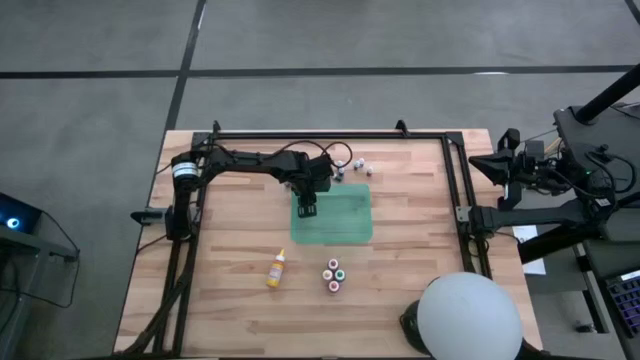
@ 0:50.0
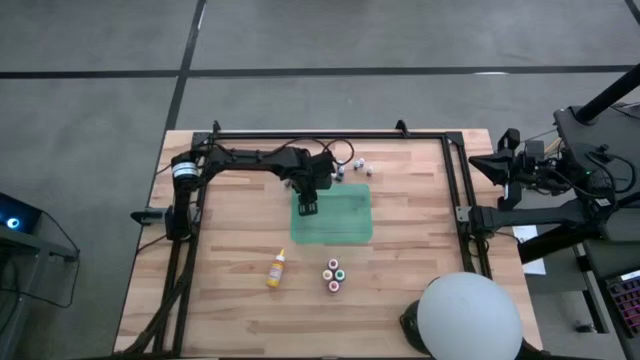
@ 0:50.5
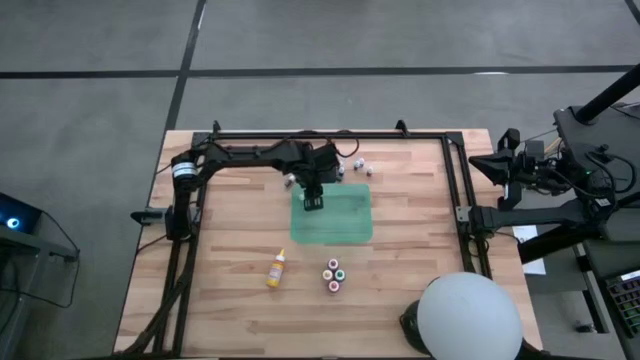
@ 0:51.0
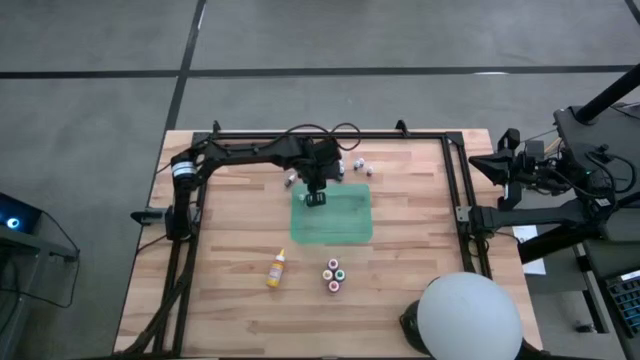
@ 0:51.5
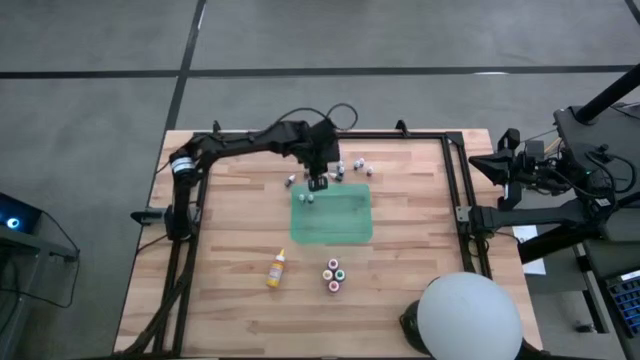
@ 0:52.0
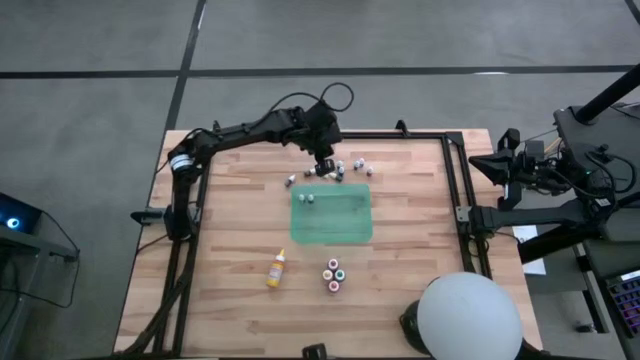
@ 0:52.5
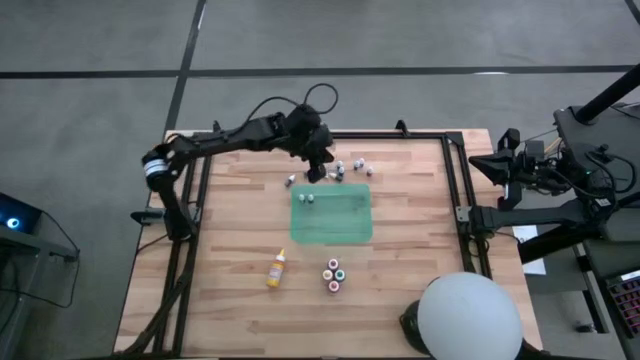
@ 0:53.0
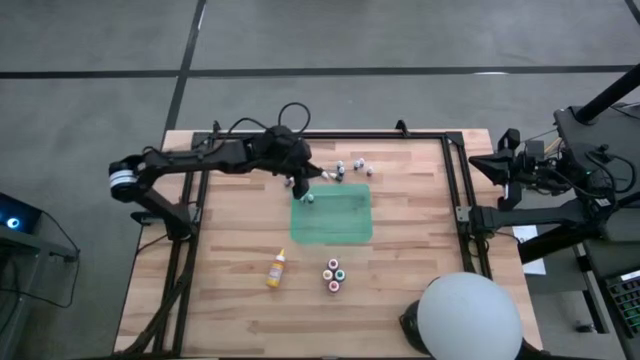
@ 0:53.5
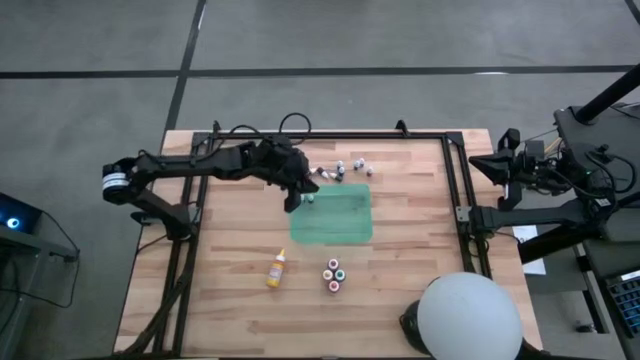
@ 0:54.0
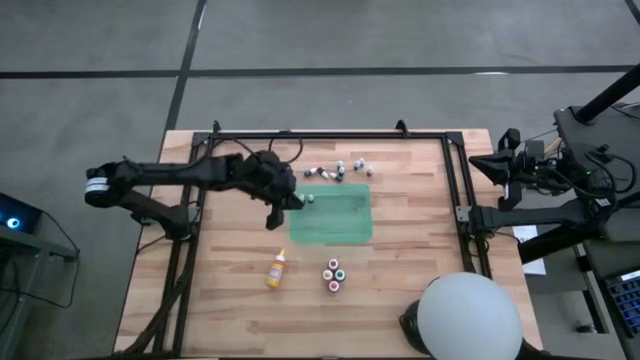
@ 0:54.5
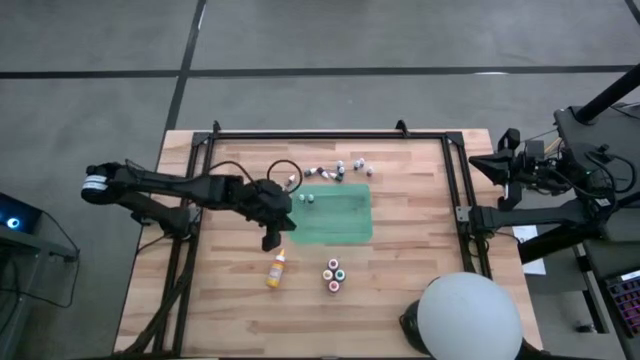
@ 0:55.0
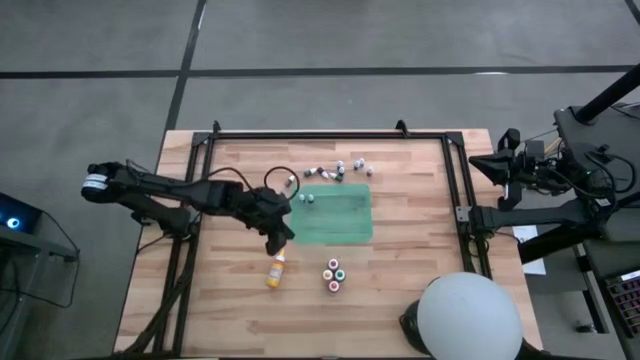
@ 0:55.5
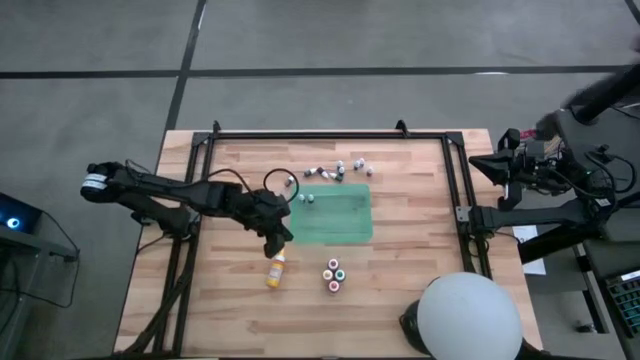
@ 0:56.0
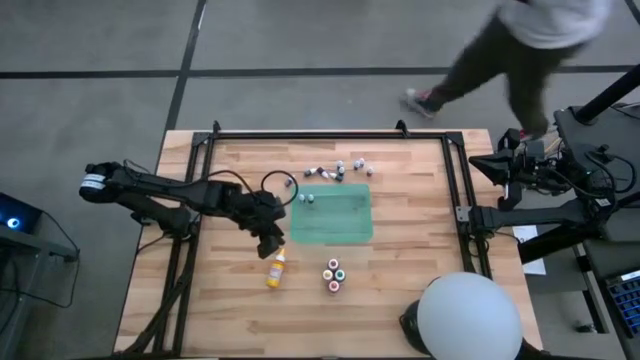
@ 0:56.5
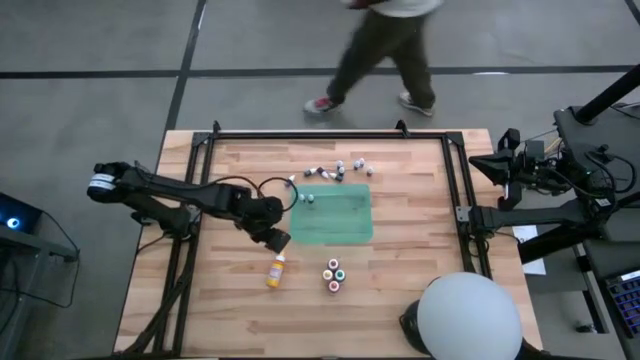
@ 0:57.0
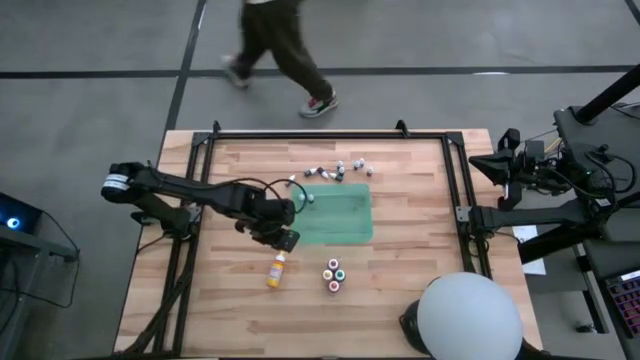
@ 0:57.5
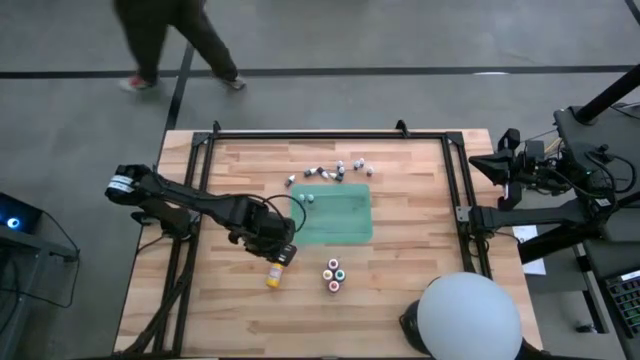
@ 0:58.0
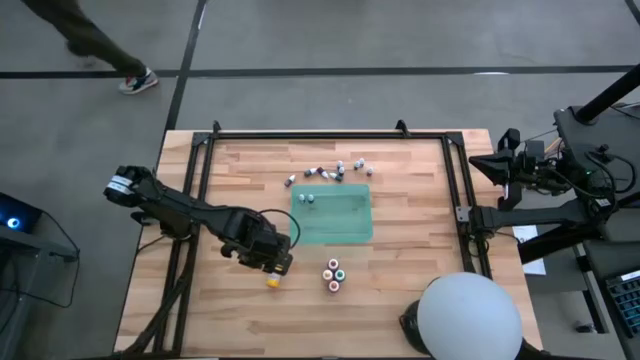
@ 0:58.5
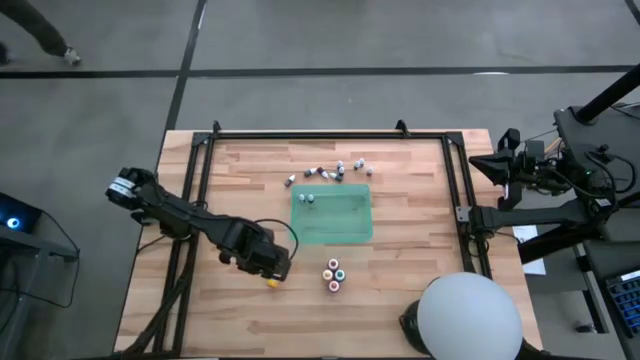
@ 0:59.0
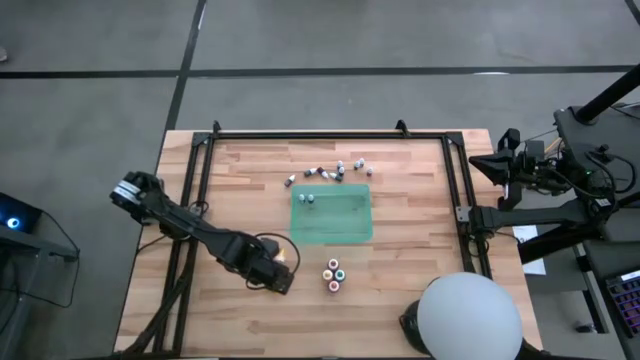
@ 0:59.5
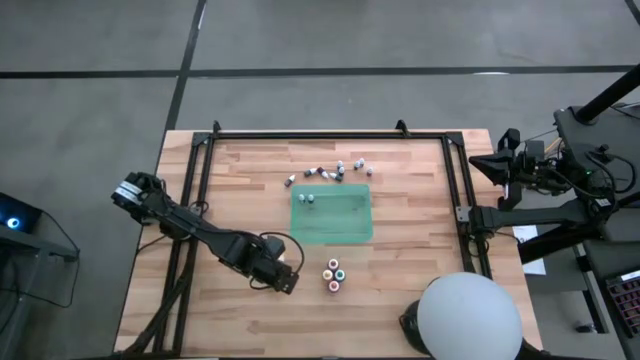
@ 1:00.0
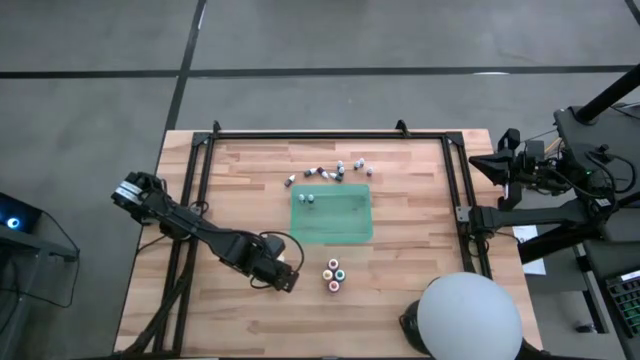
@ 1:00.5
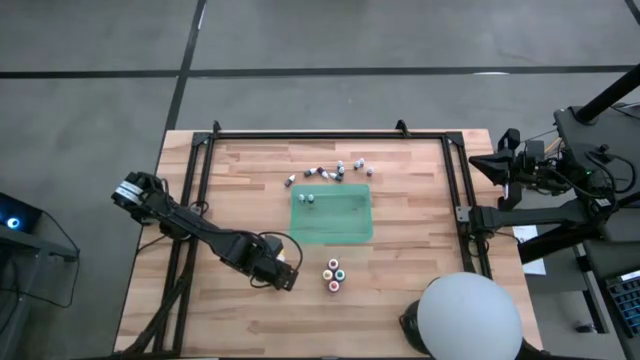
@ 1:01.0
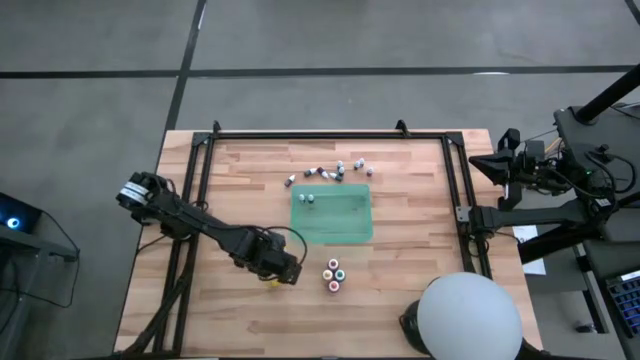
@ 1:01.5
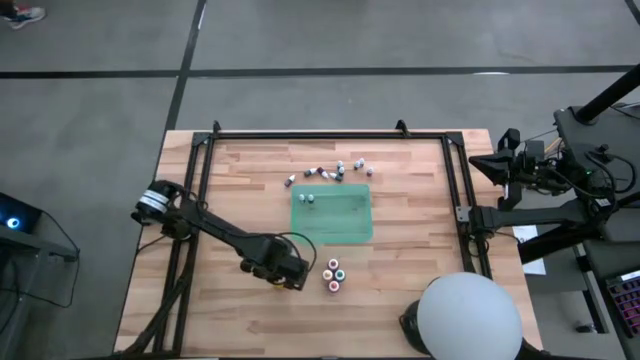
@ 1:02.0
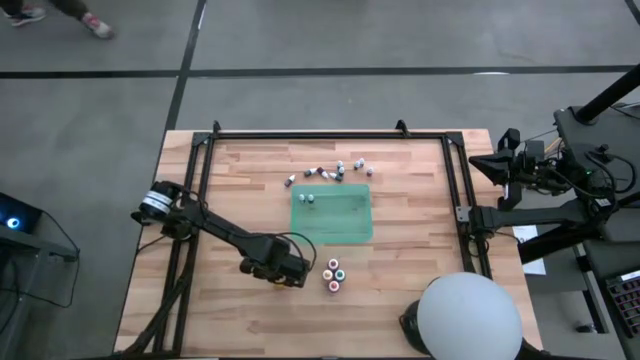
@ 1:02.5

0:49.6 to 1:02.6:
Task: Pick & Place food coloring
Put the big yellow food coloring bottle into the green container

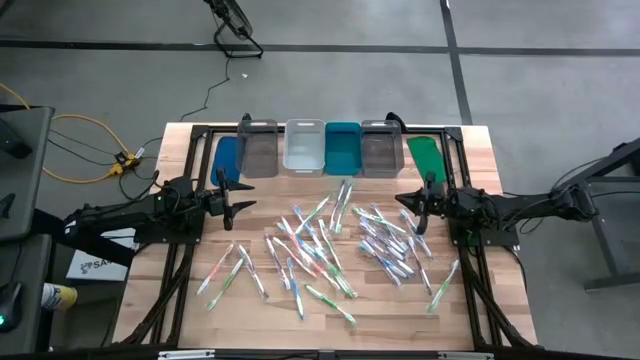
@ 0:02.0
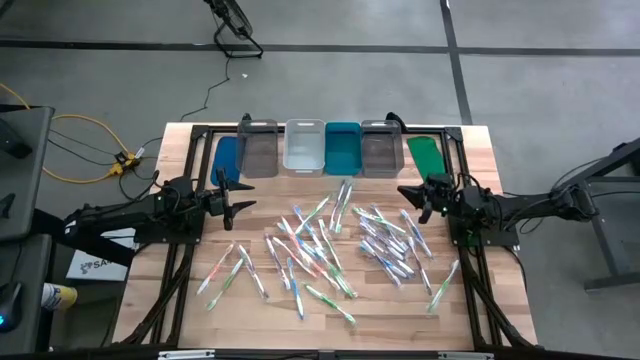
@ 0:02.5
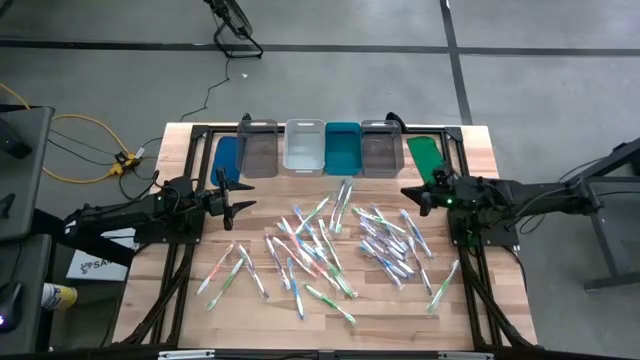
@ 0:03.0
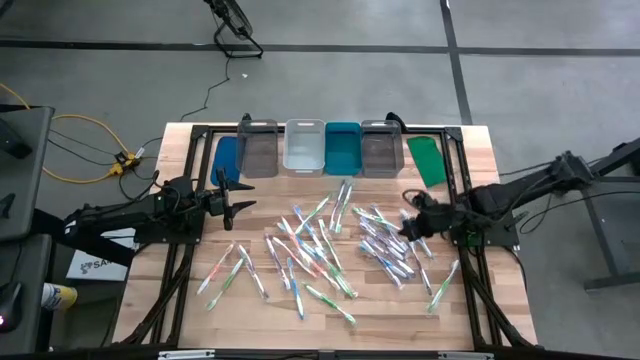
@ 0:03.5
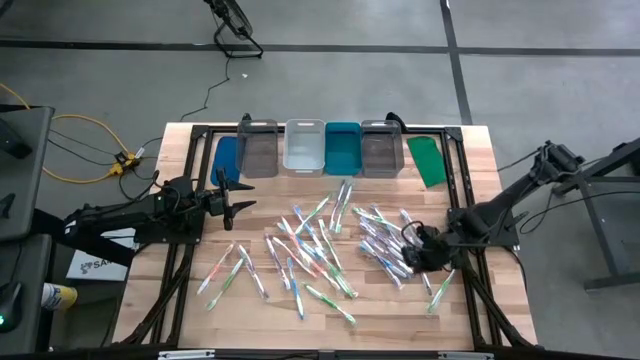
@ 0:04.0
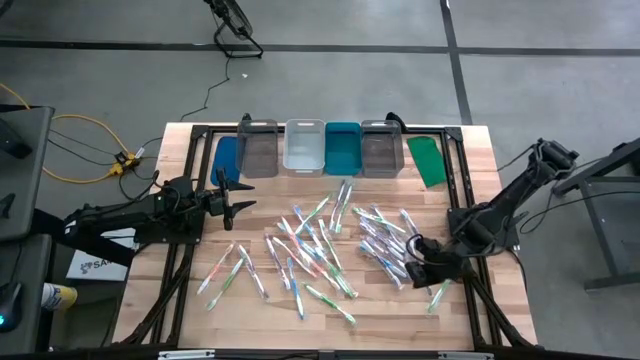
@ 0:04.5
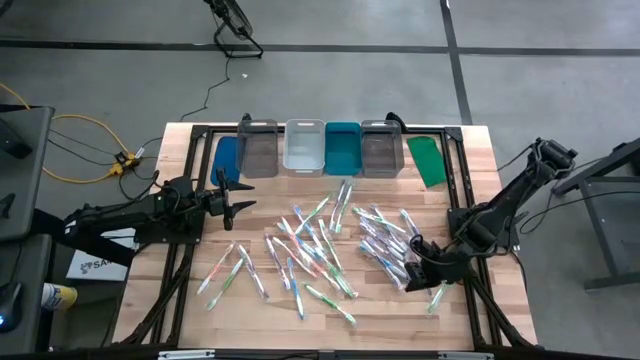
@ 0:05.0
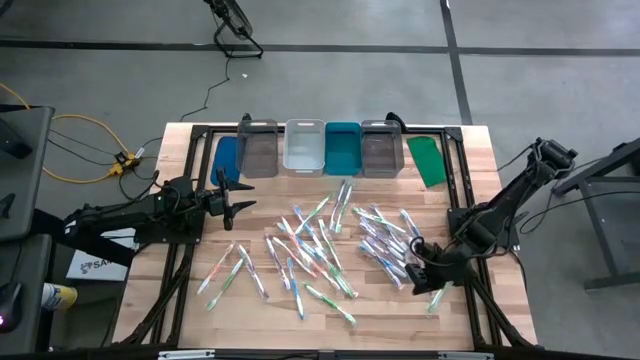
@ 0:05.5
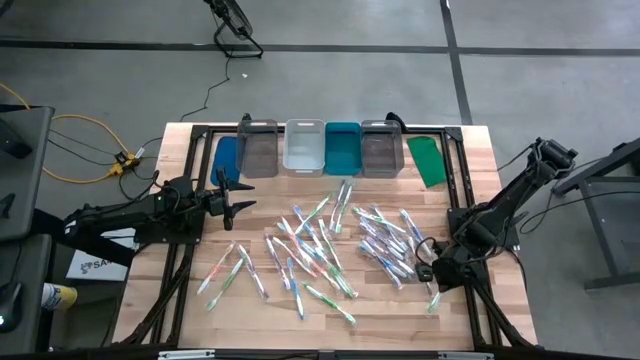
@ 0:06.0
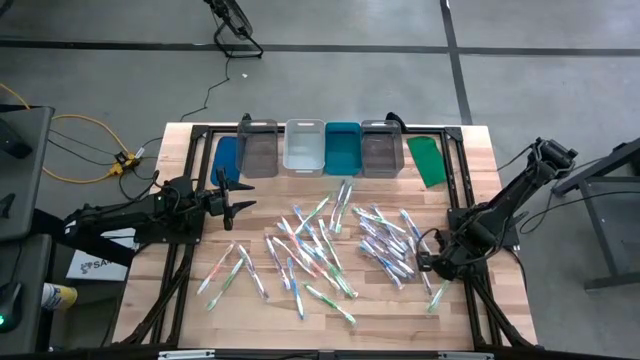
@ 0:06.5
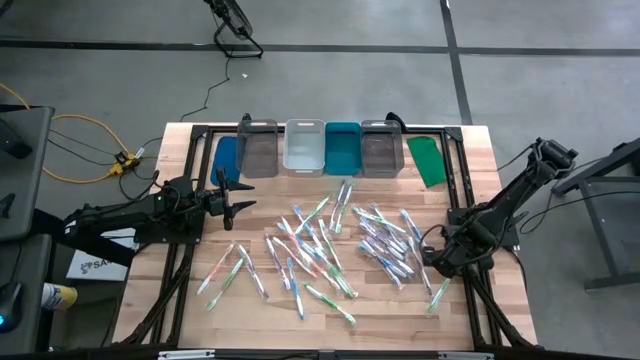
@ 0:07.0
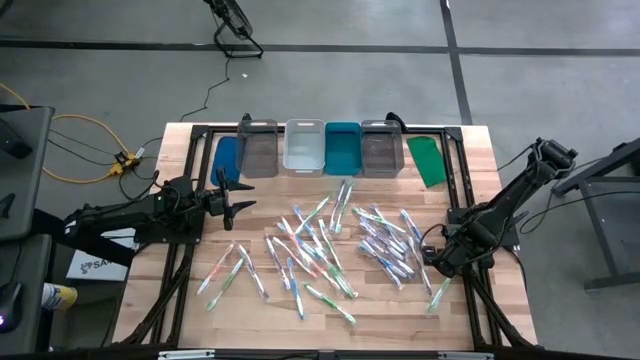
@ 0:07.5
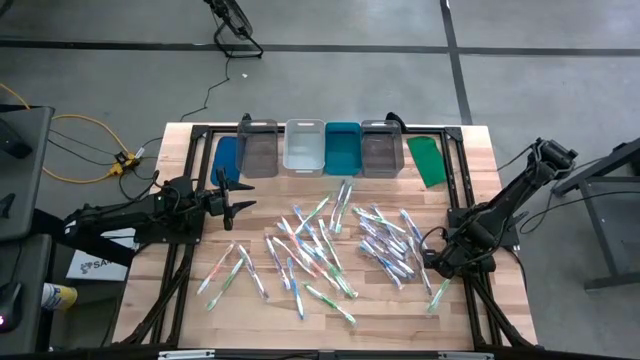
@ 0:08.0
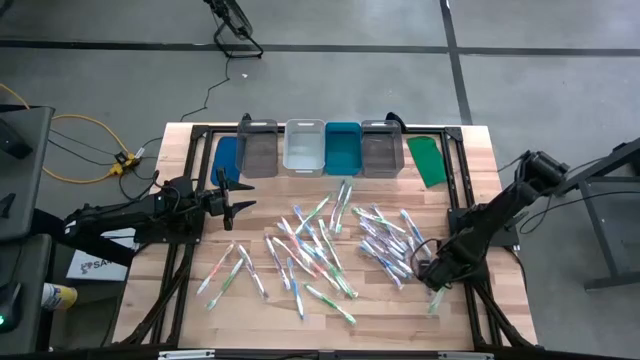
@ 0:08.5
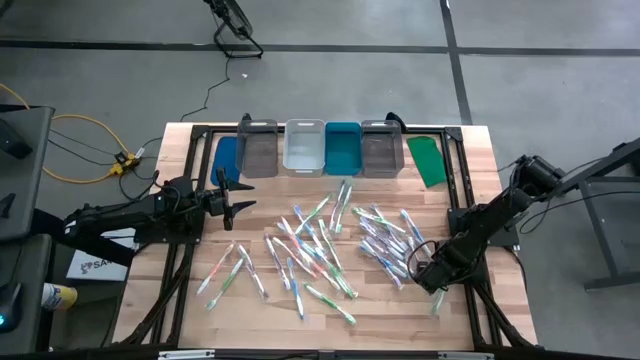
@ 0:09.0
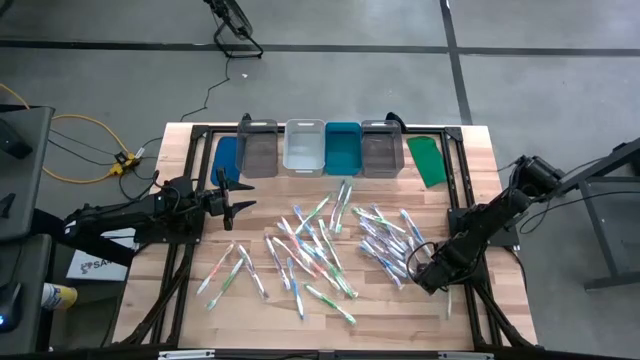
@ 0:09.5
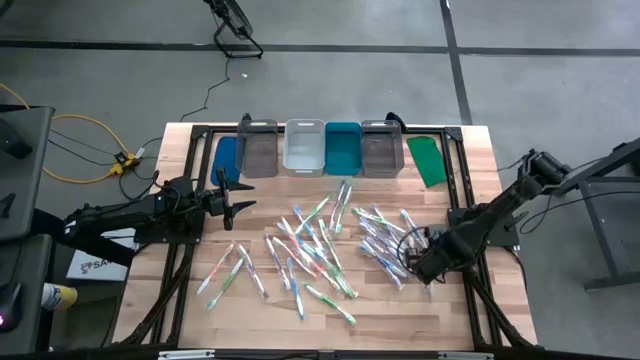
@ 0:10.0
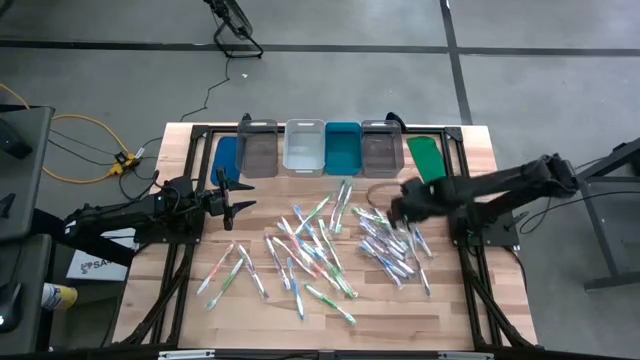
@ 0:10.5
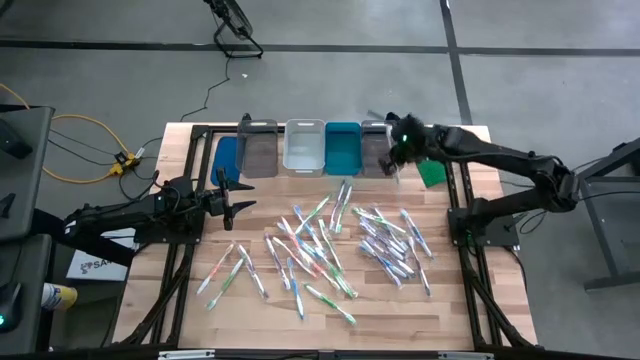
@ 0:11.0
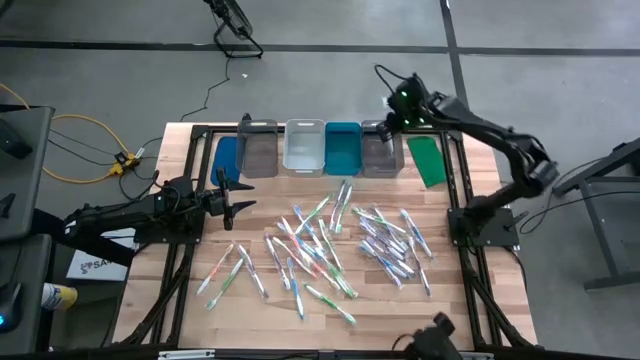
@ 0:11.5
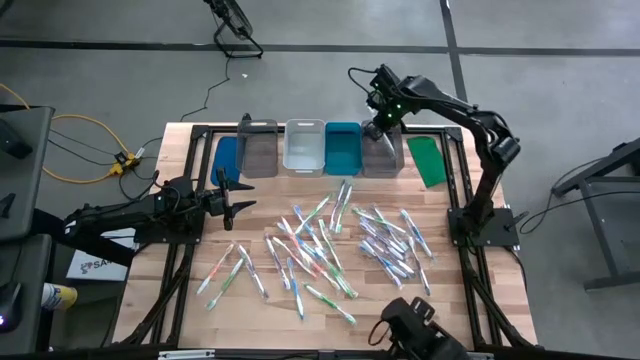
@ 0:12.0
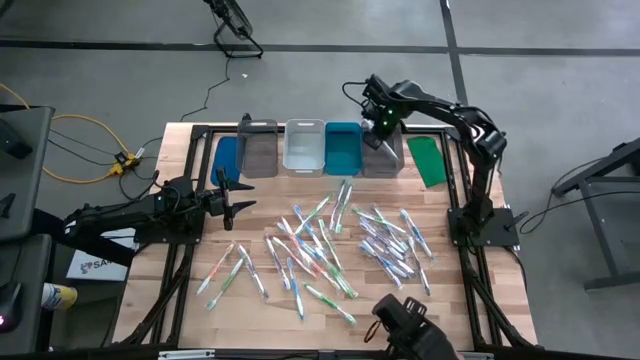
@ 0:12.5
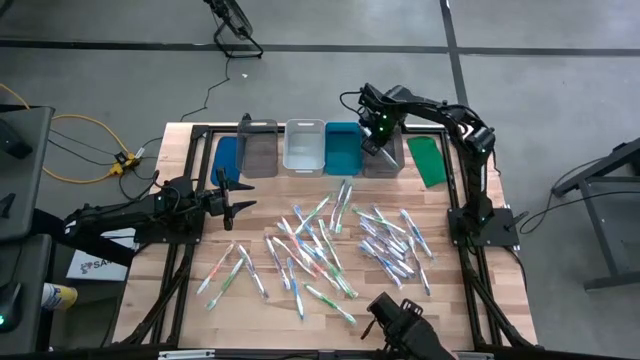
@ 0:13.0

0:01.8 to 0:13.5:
Task: Pick & Place Toothbrushes
Put the green toothbrush into the right black bin
